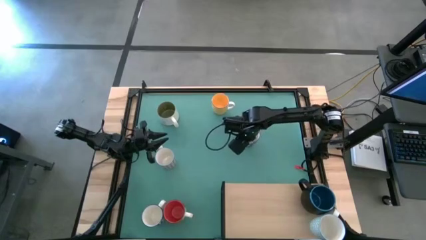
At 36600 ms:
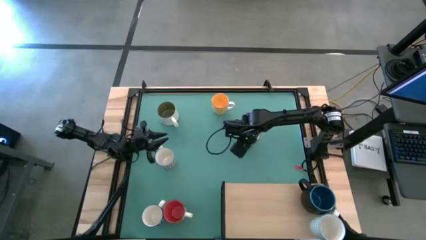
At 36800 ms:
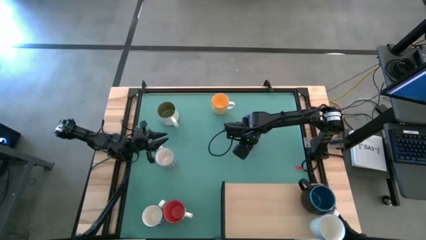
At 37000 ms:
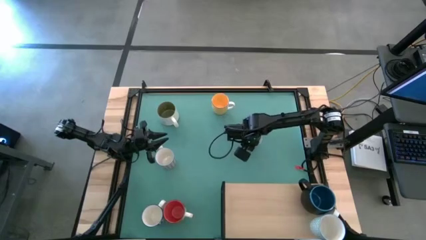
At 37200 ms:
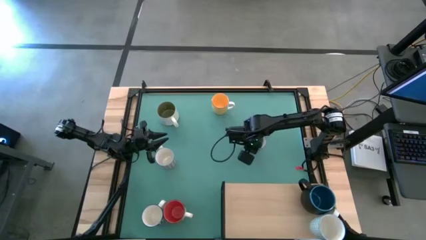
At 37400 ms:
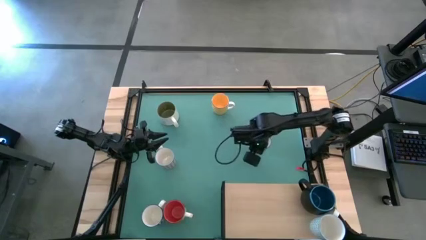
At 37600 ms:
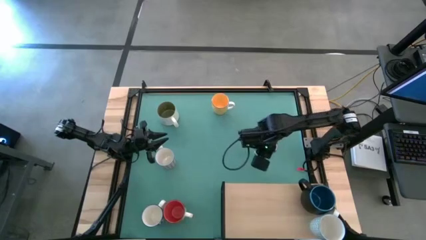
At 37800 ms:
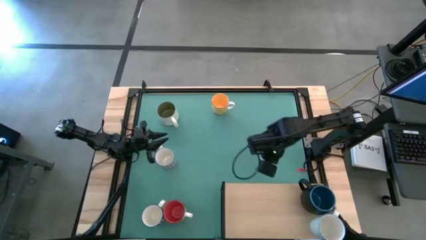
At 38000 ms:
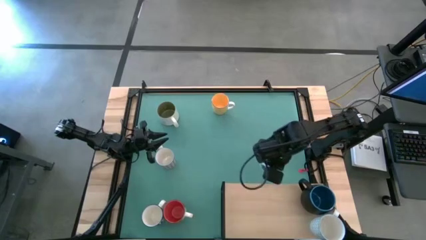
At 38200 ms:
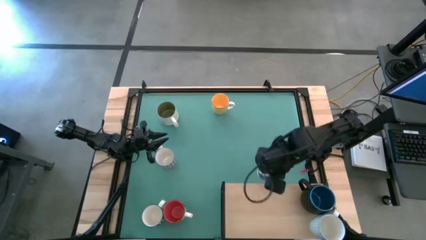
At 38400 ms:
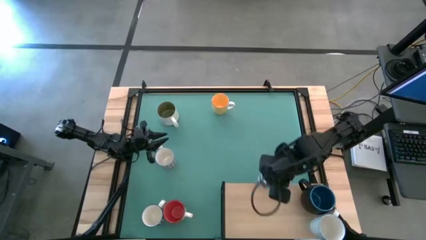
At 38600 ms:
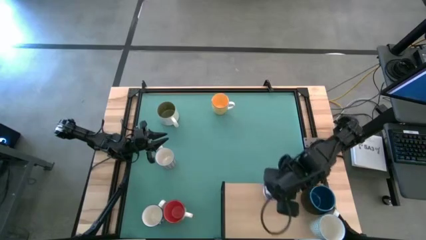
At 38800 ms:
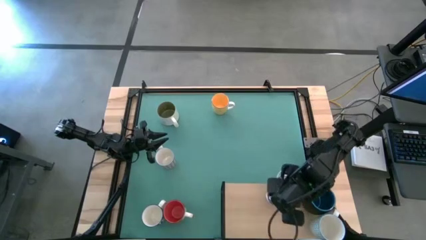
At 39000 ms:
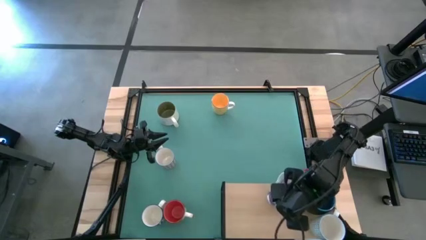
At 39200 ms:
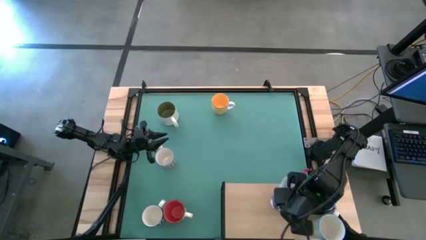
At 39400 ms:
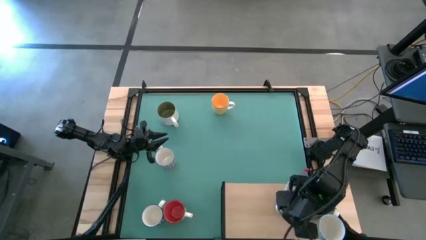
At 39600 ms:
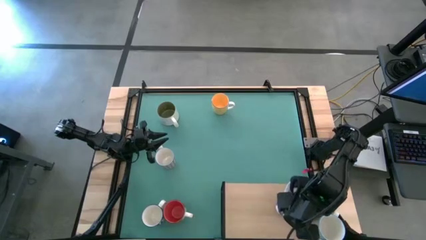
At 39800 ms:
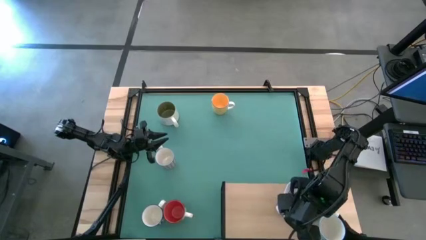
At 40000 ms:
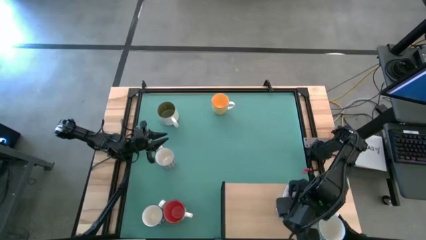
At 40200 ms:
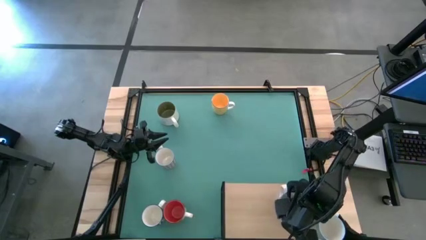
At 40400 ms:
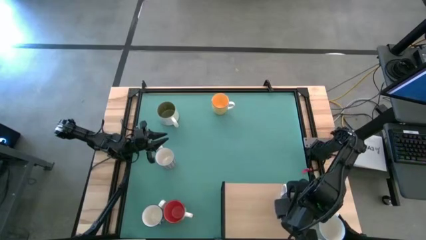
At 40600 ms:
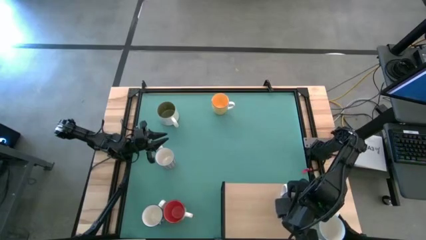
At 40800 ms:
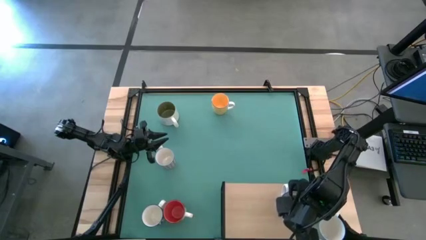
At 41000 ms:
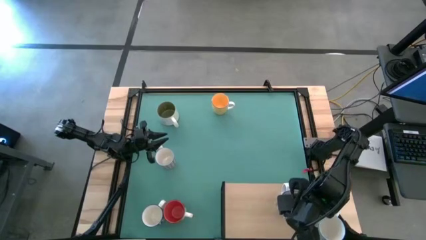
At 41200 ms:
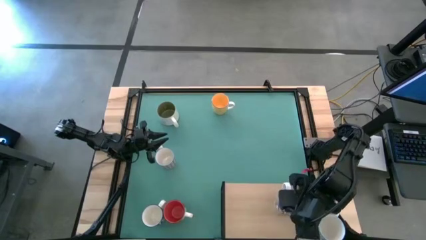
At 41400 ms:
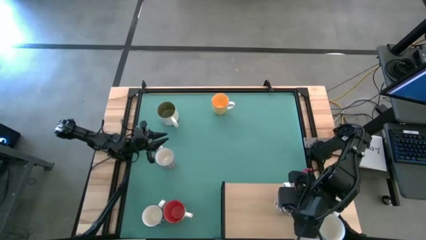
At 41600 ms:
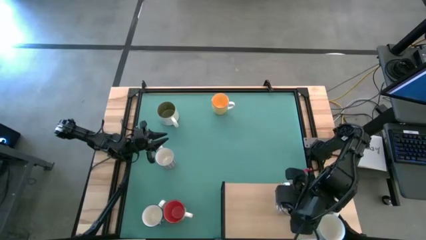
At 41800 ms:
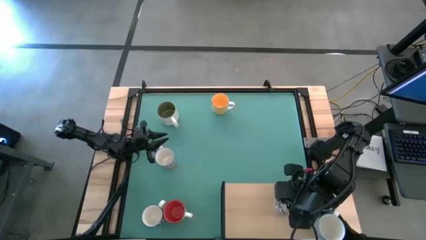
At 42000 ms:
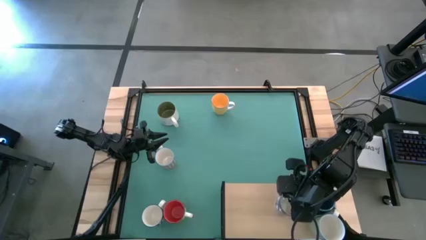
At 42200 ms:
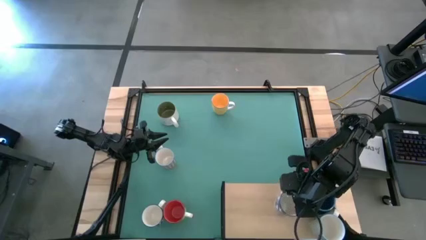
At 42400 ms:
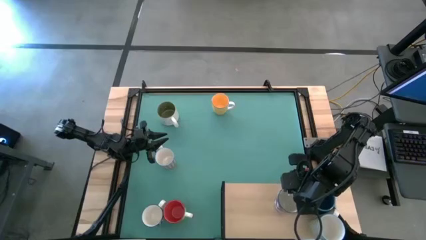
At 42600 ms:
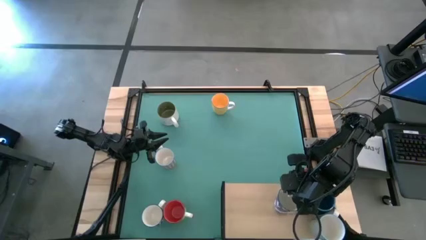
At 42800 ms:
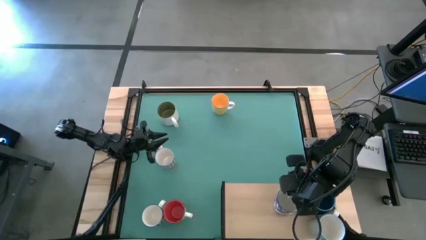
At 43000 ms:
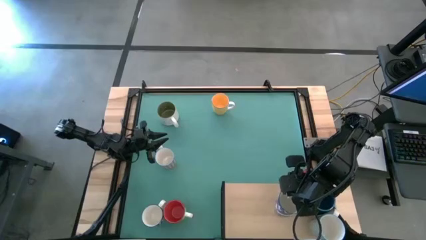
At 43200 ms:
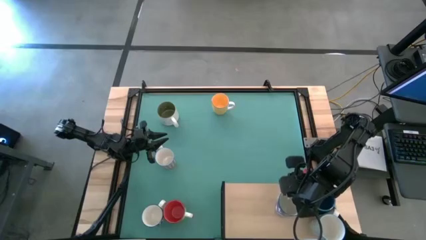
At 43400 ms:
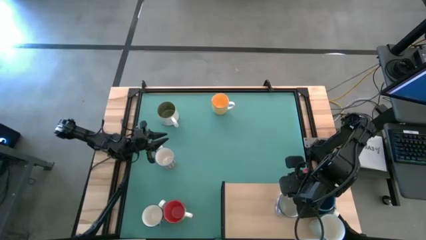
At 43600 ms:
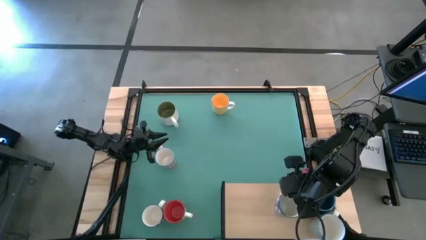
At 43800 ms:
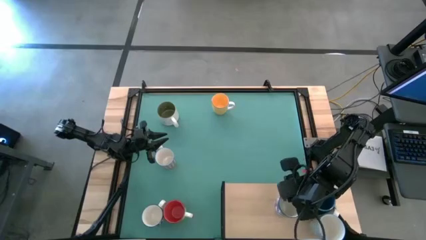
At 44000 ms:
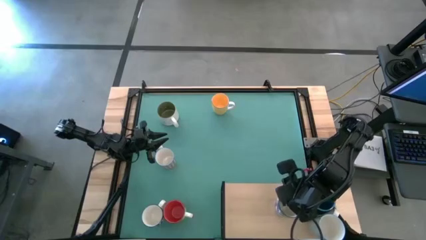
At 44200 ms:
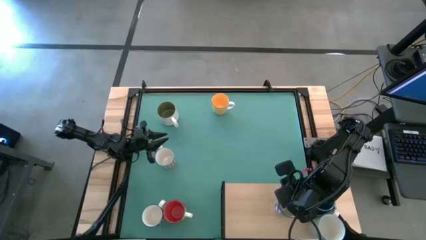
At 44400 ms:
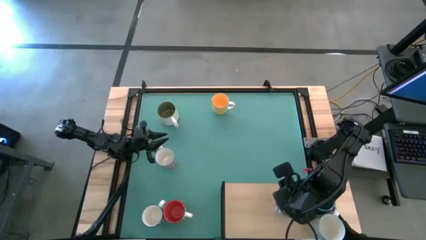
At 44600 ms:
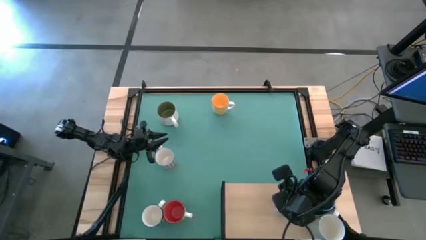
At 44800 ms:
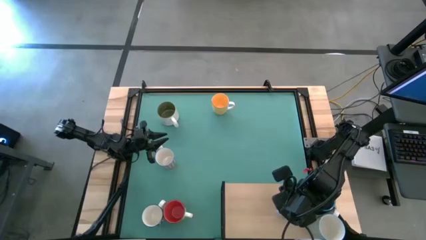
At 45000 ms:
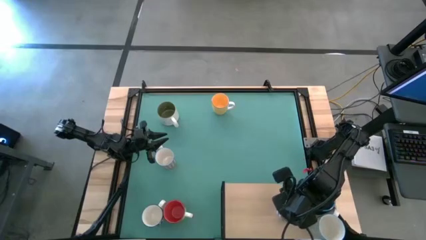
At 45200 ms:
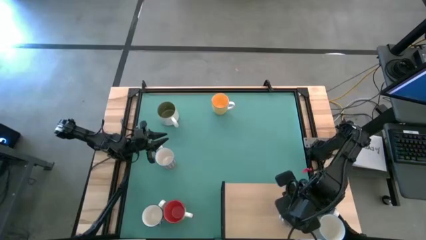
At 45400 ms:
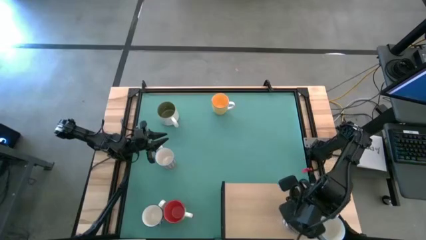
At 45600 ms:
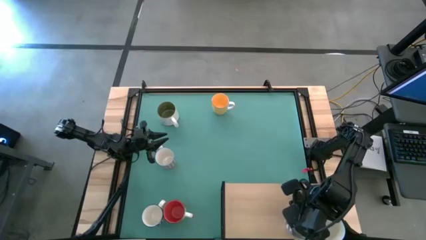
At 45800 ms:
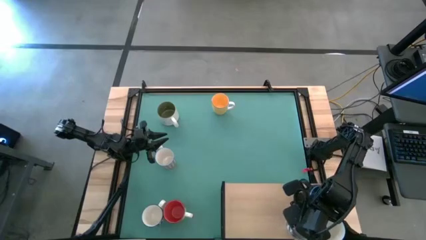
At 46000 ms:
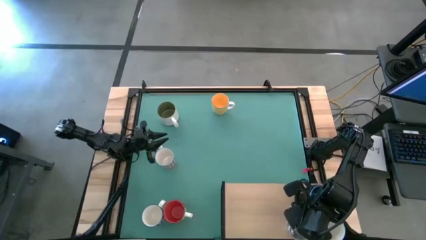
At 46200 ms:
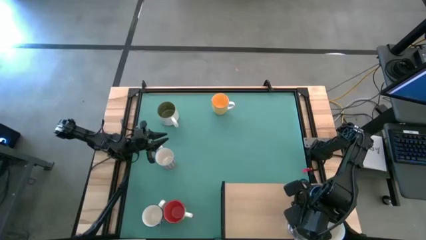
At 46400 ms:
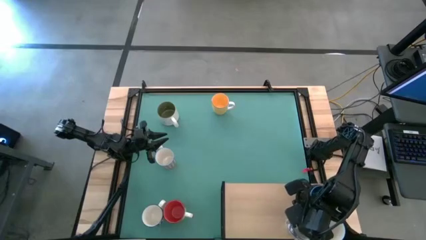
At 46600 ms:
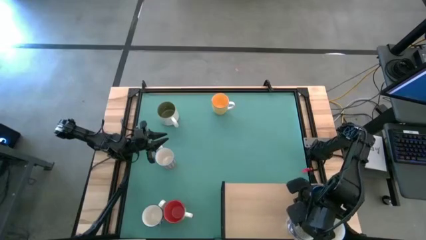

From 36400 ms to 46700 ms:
Task: Place coffee mugs
Put the blue patterned mug on the shelf
